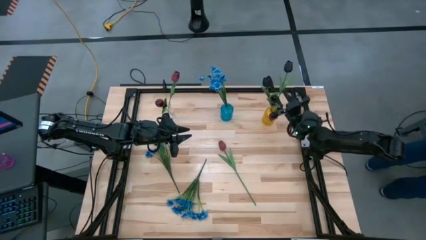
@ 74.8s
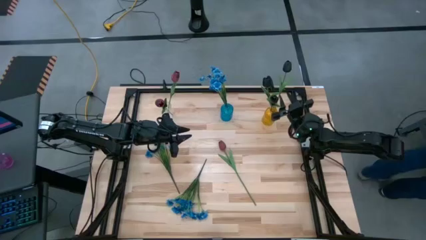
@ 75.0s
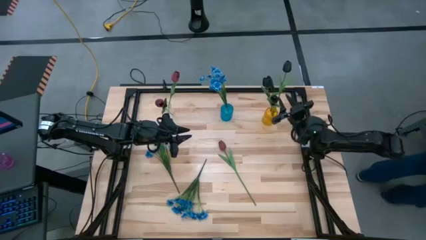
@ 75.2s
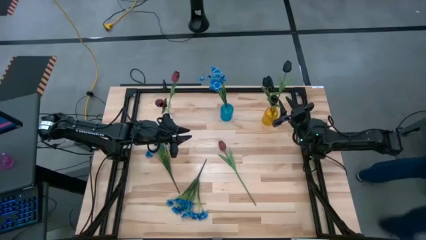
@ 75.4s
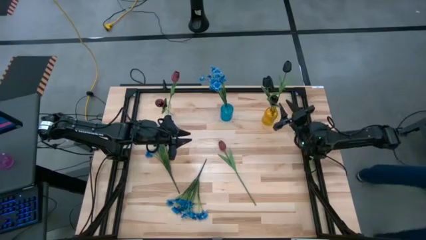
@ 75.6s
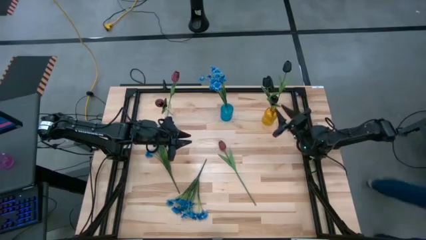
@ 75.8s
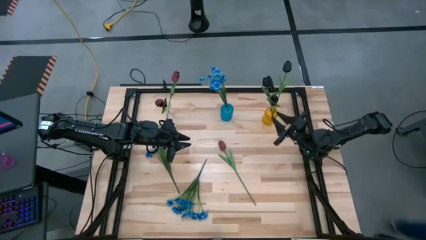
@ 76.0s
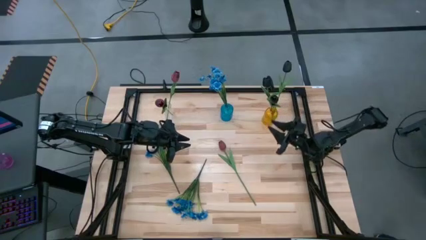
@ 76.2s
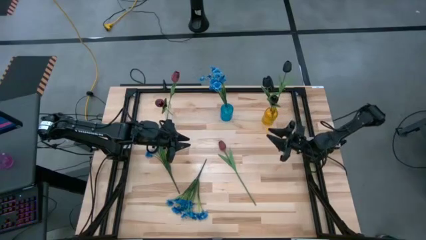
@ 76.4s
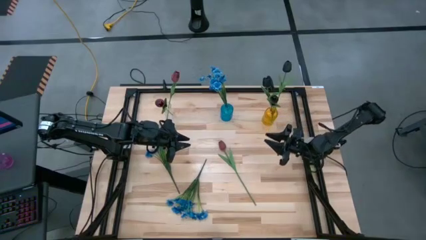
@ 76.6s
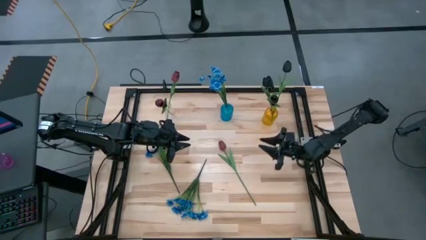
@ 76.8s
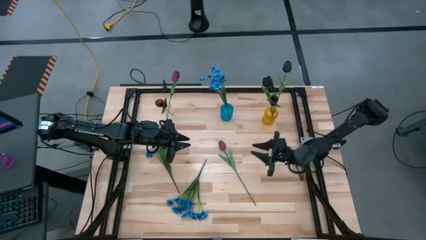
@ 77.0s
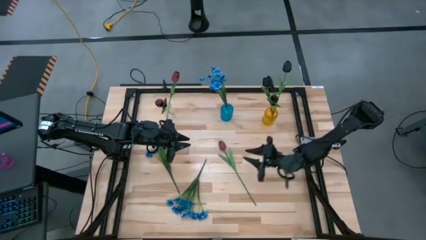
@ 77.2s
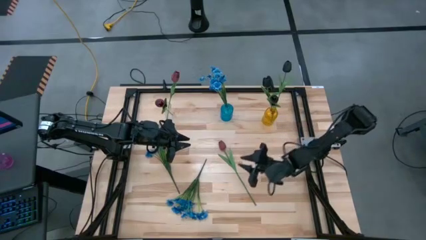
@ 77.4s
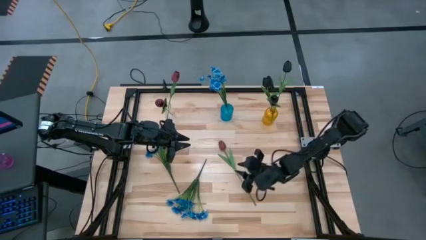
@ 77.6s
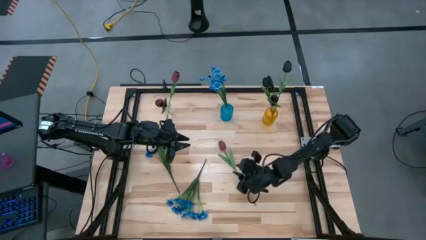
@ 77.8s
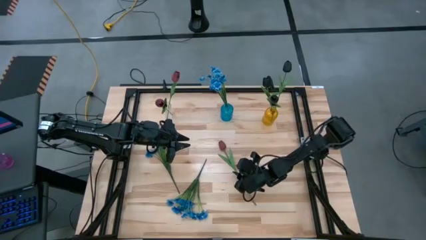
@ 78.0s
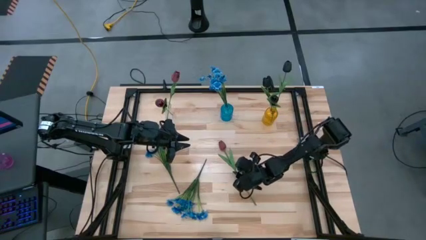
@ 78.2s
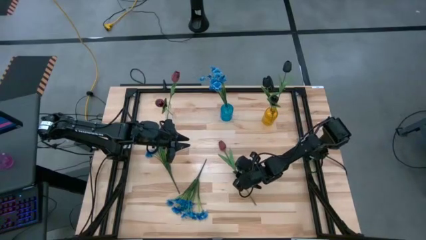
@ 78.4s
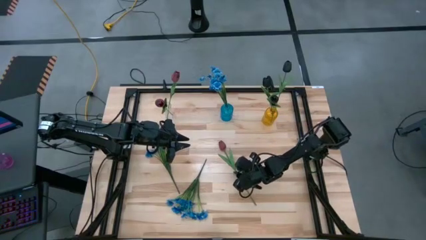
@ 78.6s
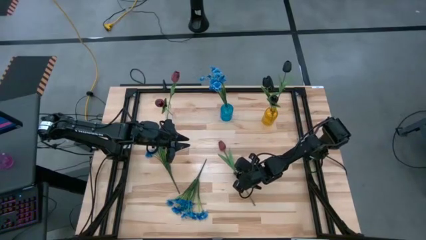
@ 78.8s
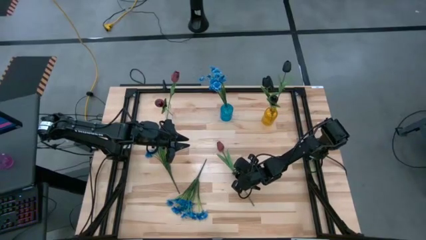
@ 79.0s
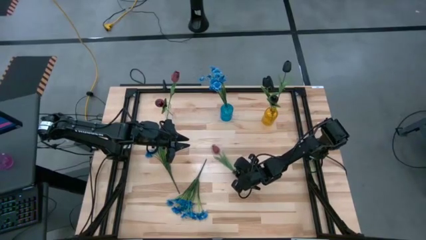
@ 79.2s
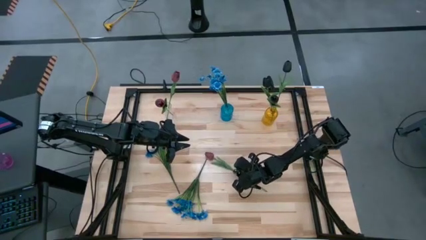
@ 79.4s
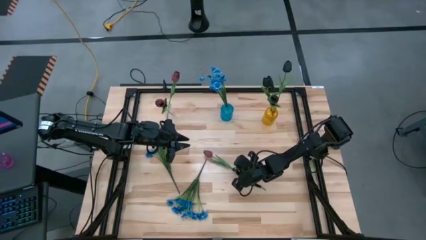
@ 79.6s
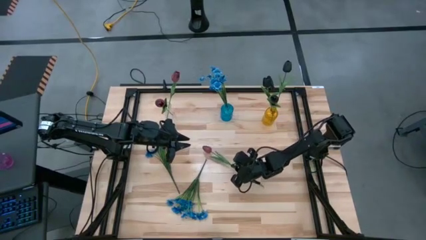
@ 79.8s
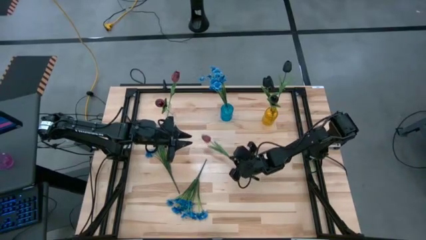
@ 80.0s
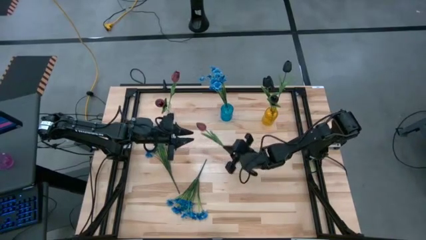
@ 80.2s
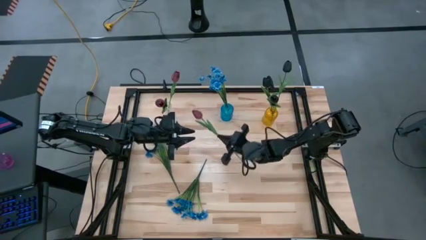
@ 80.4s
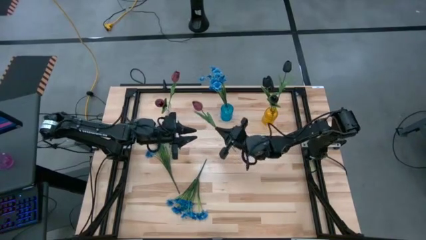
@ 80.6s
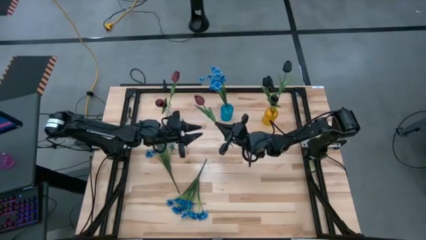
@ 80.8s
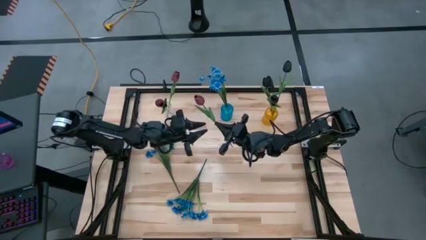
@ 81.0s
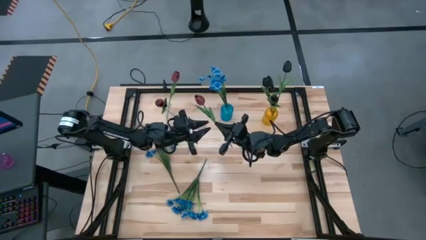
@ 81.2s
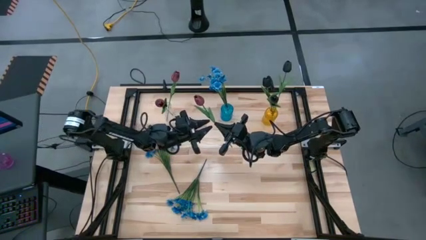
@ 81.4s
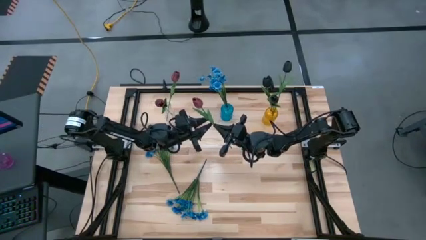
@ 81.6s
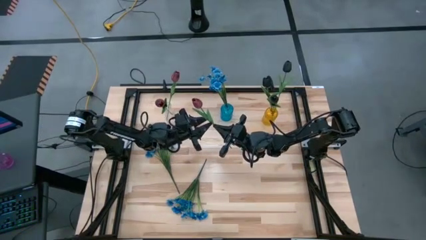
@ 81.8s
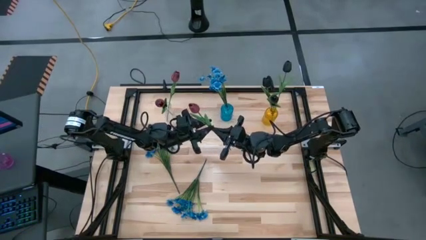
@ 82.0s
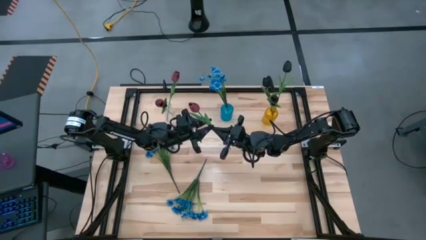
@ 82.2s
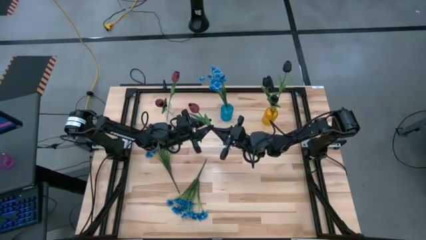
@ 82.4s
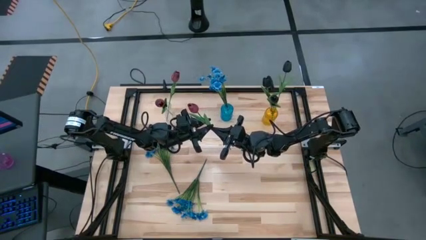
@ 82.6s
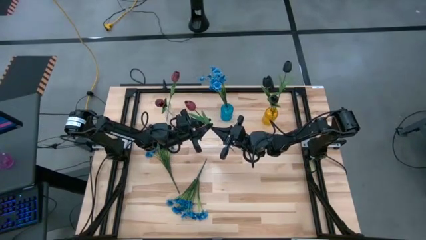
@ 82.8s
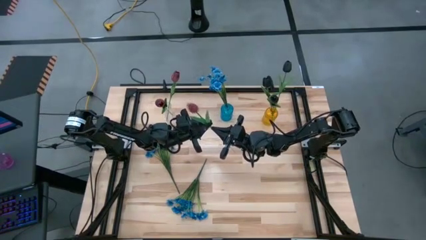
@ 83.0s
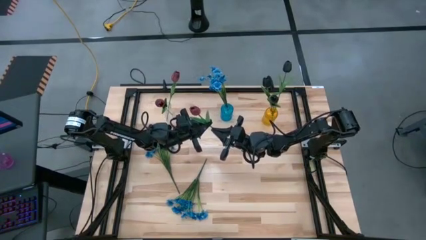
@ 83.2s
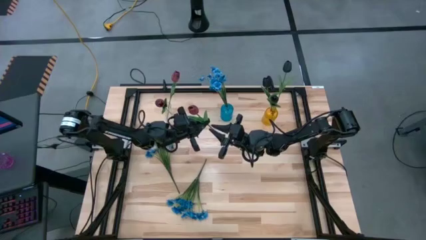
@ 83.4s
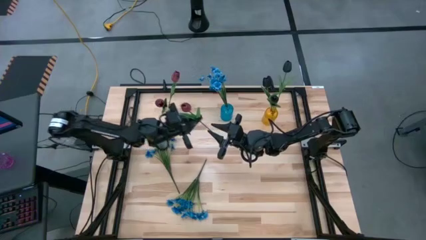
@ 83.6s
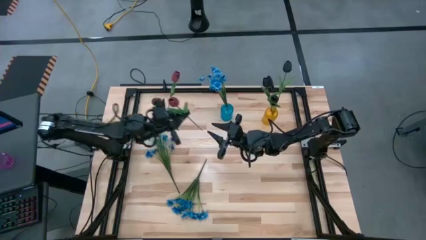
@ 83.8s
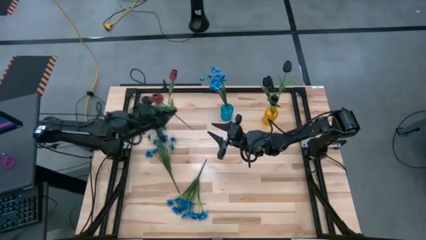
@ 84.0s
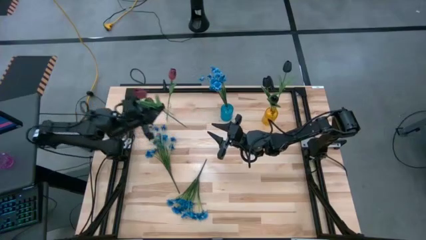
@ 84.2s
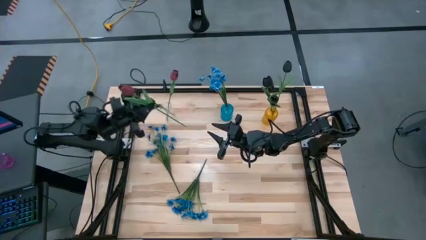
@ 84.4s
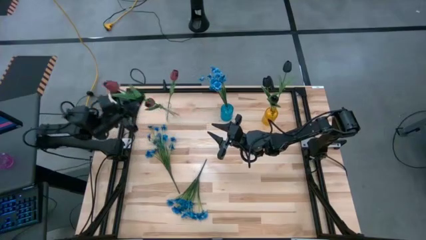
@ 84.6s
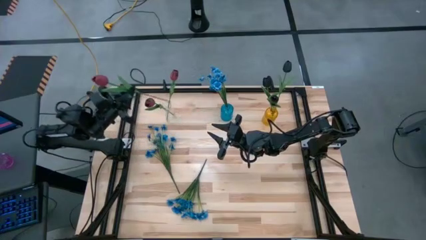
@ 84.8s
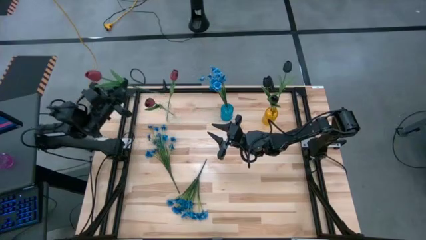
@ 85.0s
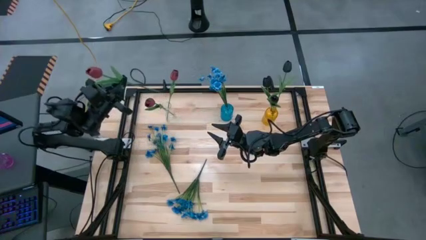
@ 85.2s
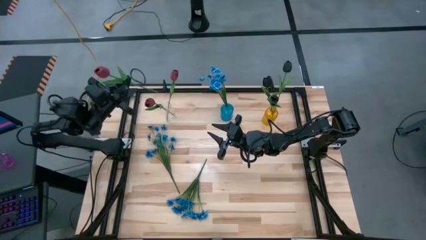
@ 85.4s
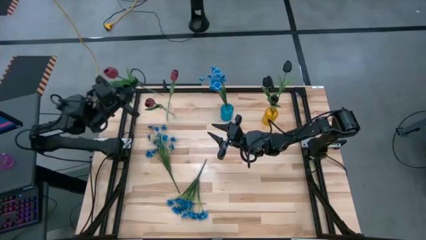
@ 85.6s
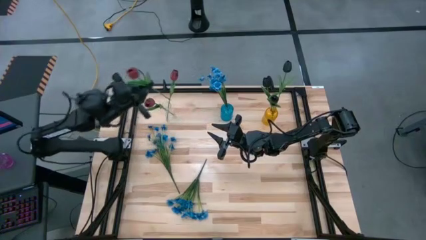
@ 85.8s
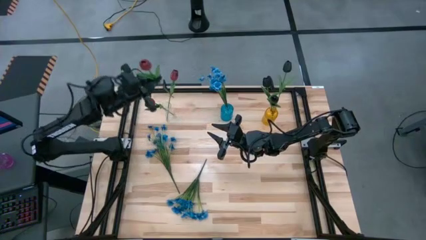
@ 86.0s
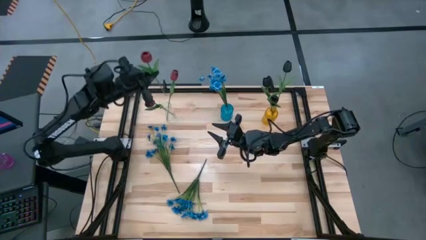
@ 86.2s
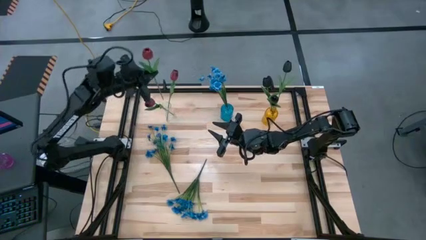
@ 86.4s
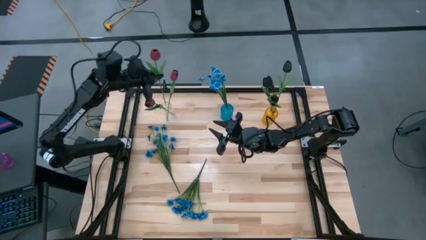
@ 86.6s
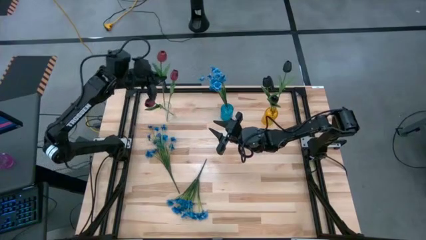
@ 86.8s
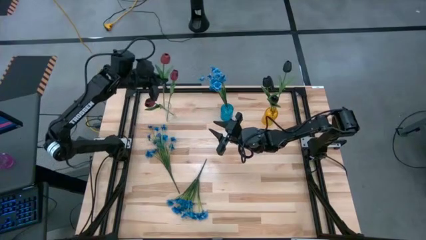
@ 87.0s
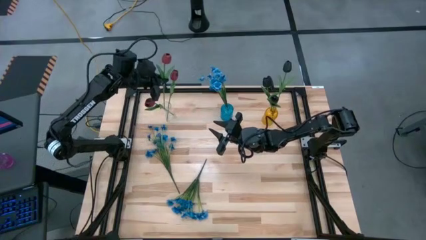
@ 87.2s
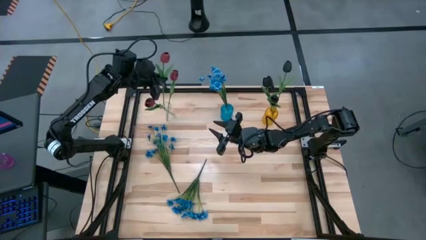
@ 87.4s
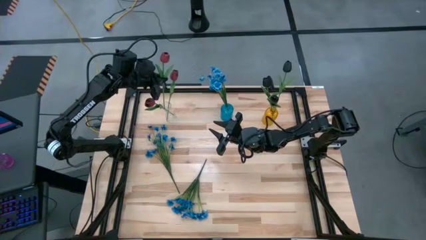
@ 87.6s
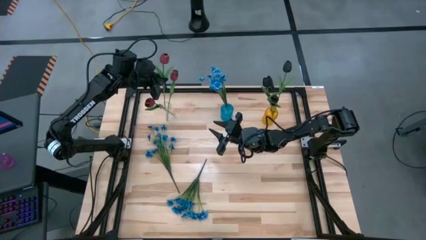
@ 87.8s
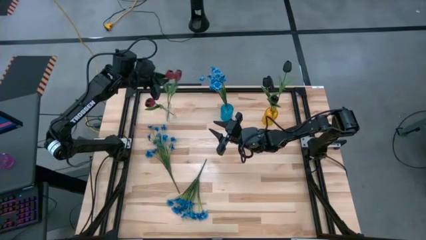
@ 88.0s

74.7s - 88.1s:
Task: Sort flowers into vase by color
Put the red flower into the transparent vase

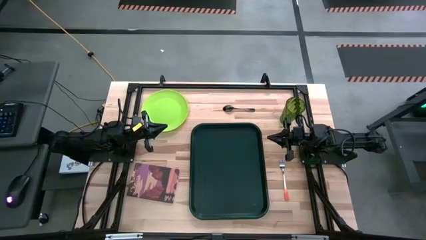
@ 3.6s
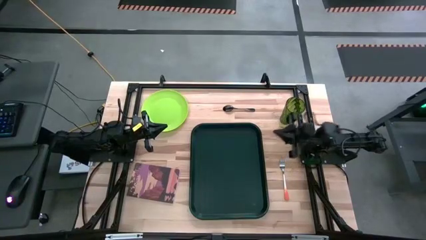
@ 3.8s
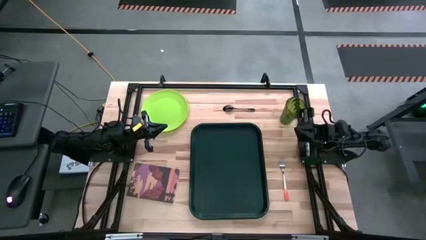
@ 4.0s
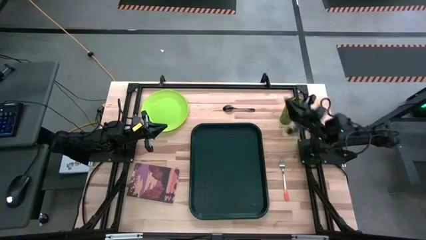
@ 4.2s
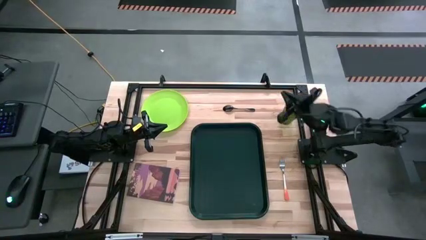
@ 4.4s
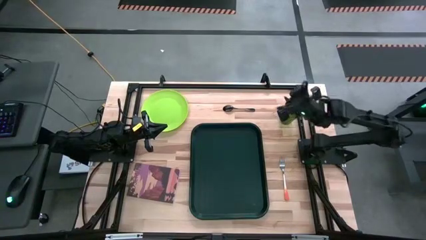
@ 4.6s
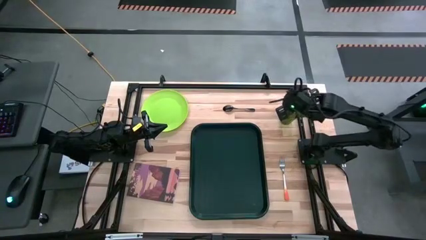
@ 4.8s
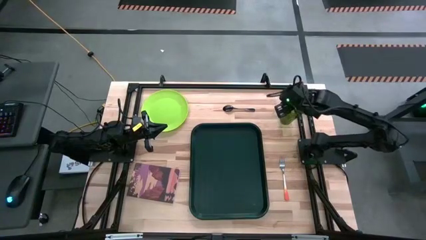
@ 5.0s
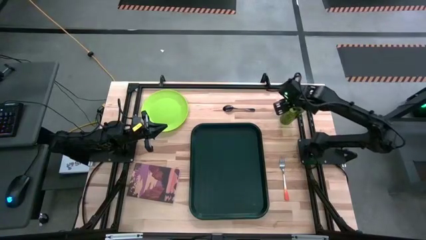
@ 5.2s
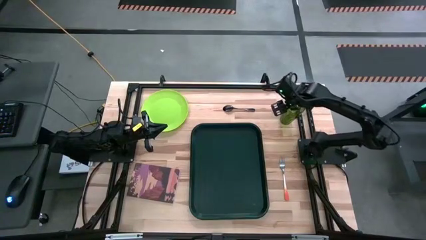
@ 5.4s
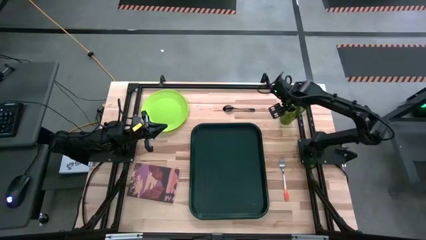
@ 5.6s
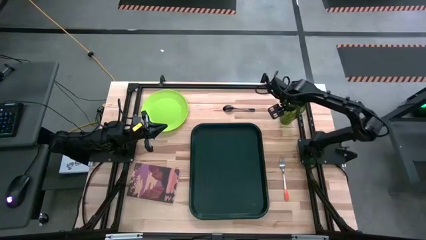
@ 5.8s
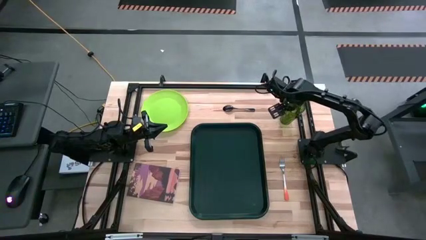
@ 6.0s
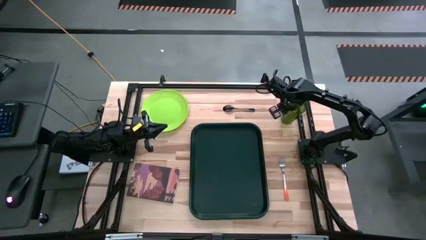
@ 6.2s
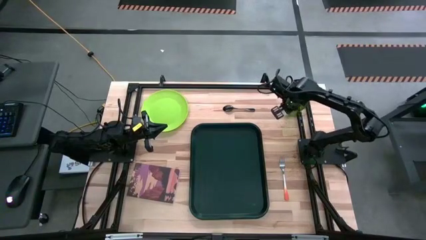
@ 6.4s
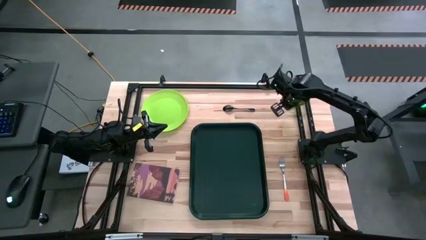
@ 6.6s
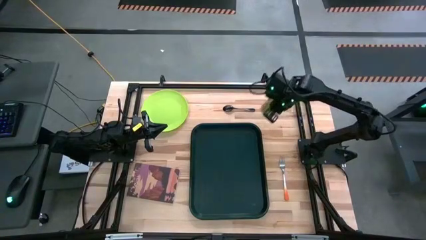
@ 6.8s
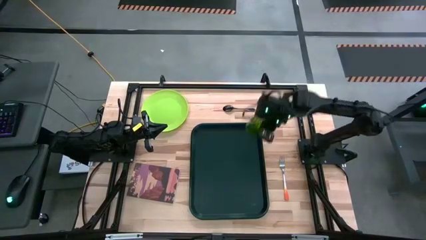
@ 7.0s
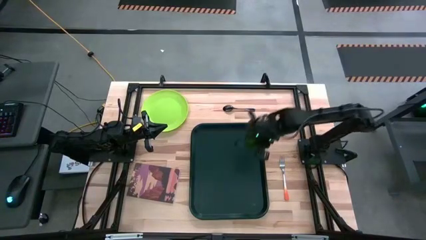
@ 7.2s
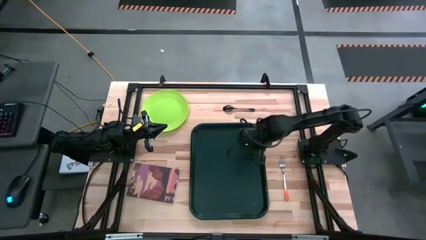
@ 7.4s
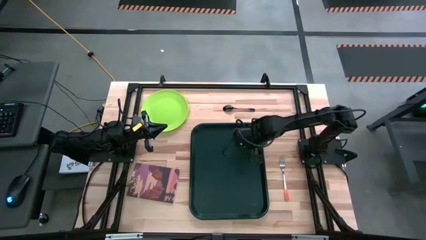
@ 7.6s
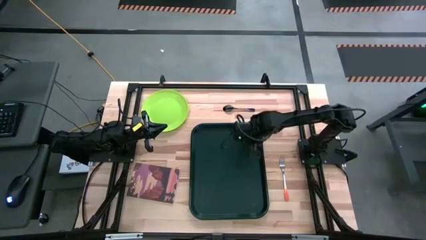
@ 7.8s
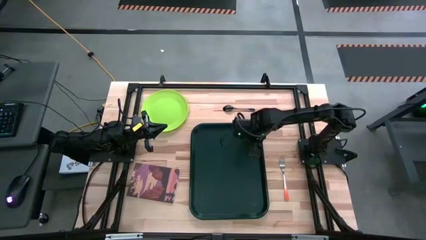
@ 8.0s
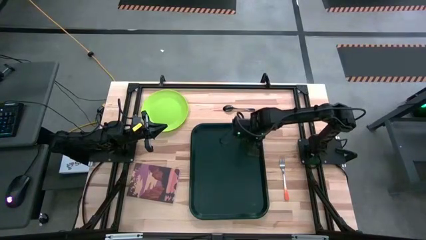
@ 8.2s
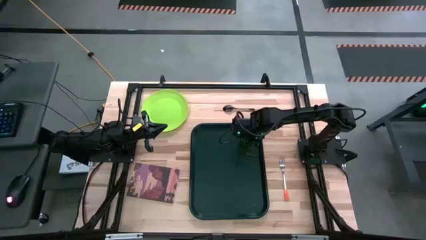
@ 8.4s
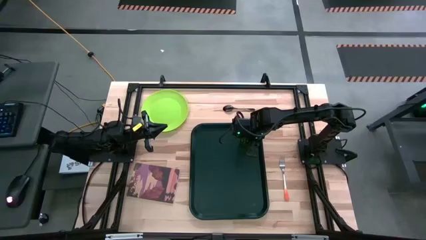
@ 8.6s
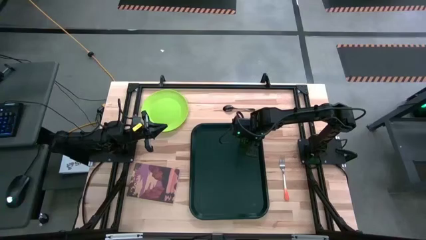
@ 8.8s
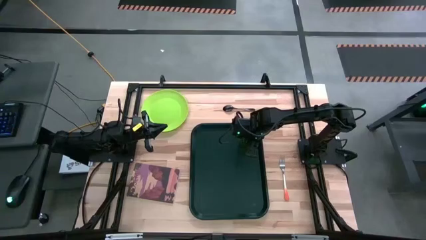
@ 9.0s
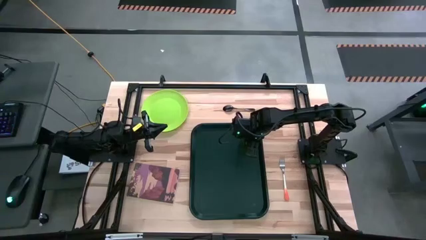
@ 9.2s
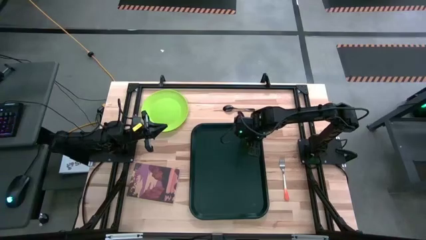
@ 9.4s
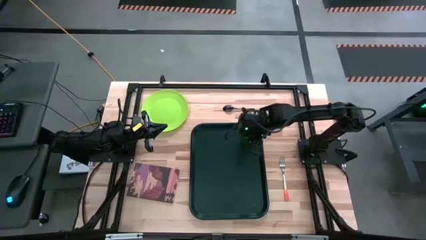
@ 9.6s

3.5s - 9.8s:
Task: Pick and place plate/cup/fork/spoon on tray
Put the green cup on the black serving tray
